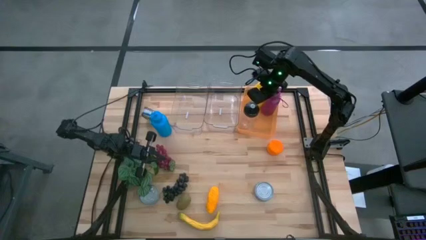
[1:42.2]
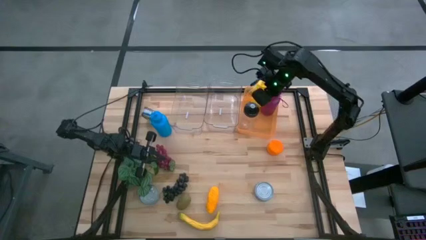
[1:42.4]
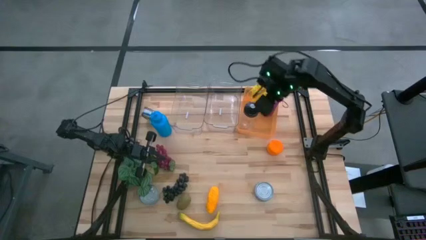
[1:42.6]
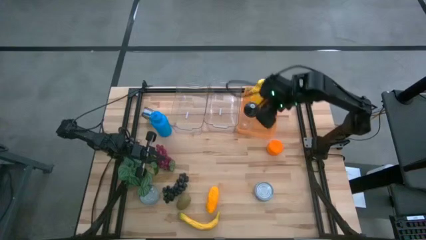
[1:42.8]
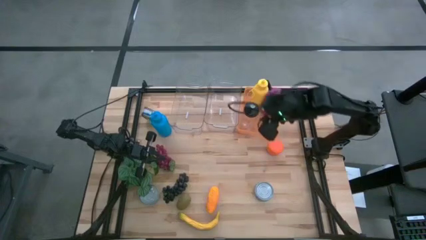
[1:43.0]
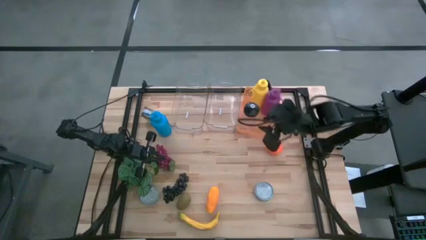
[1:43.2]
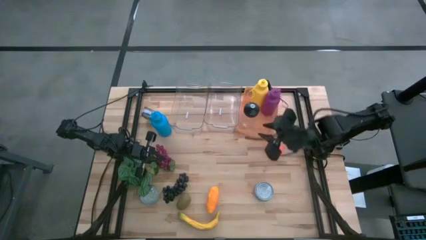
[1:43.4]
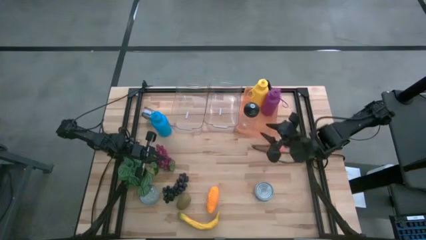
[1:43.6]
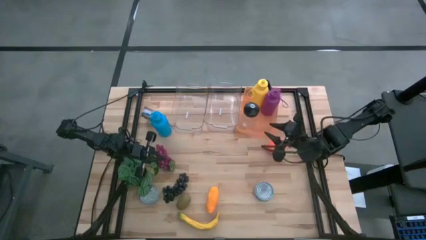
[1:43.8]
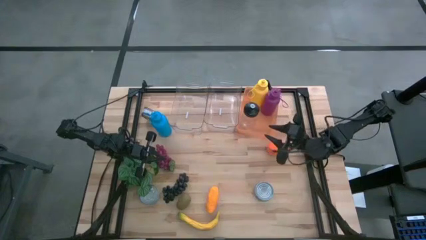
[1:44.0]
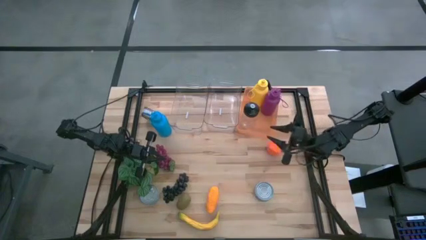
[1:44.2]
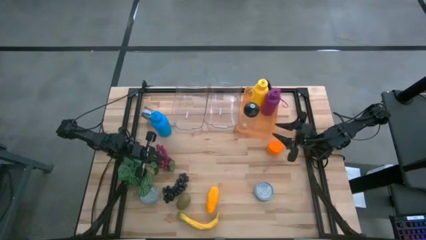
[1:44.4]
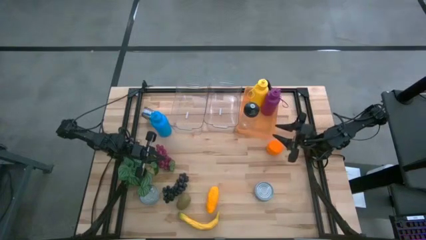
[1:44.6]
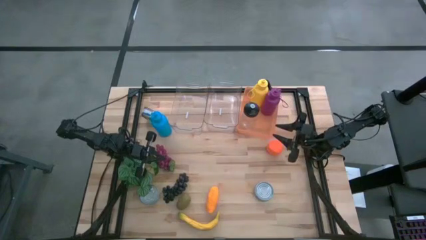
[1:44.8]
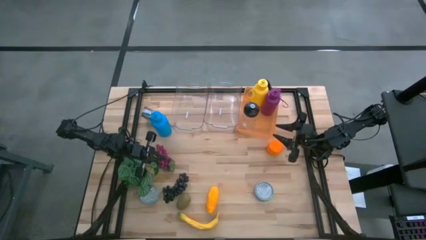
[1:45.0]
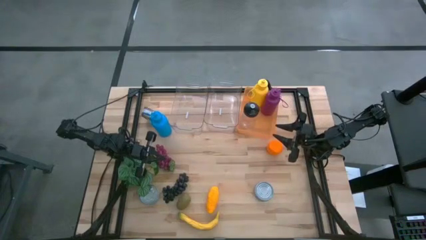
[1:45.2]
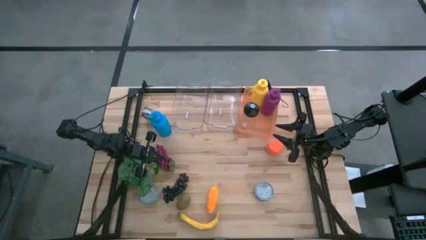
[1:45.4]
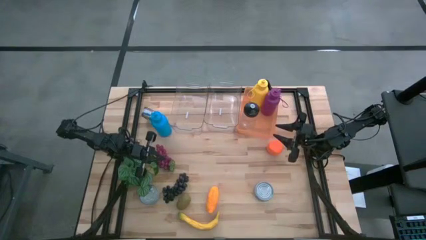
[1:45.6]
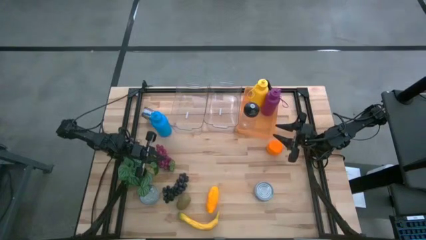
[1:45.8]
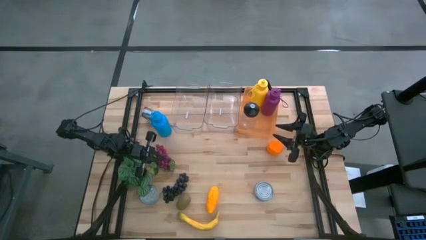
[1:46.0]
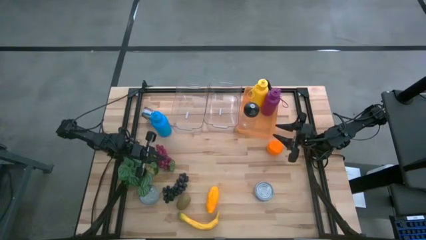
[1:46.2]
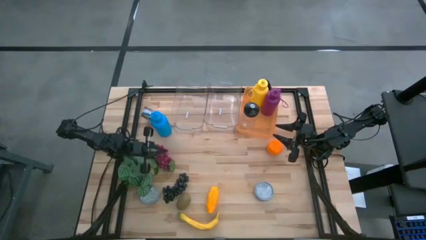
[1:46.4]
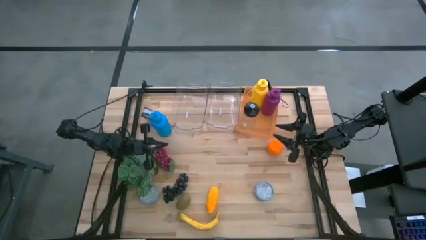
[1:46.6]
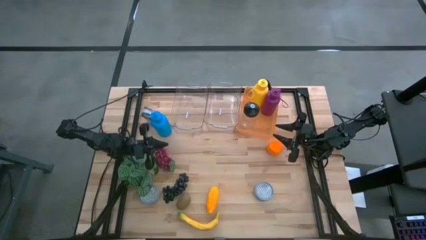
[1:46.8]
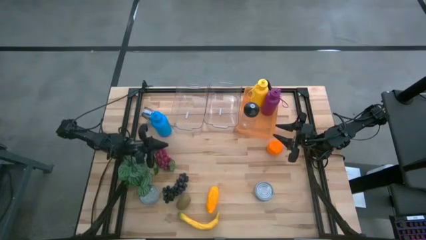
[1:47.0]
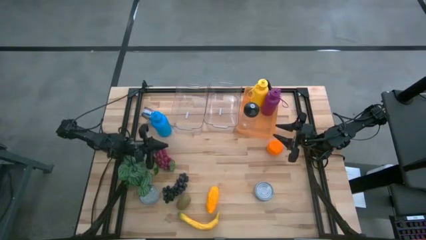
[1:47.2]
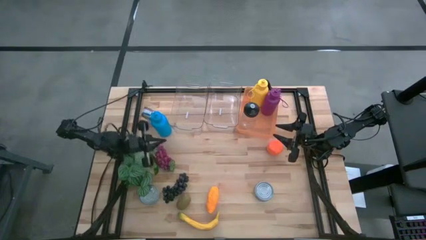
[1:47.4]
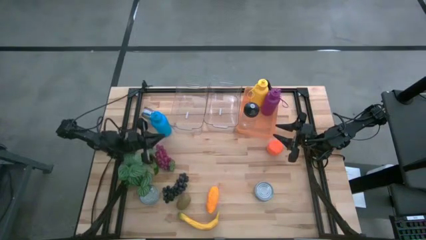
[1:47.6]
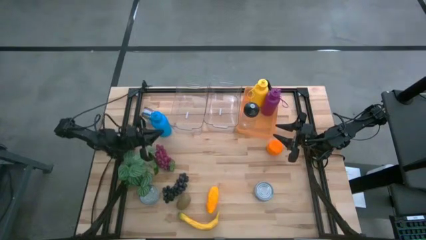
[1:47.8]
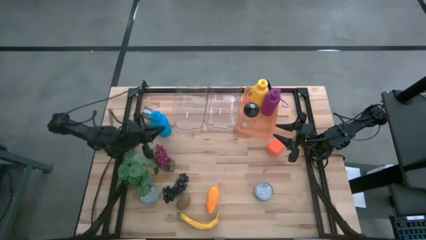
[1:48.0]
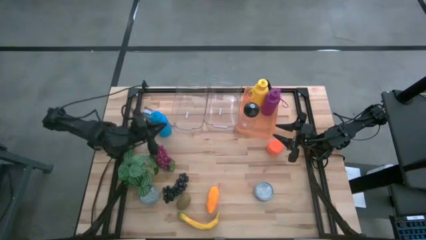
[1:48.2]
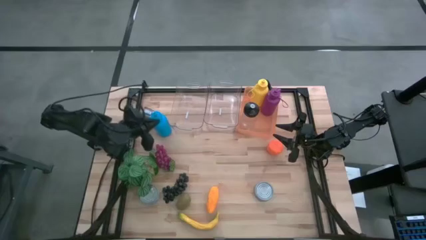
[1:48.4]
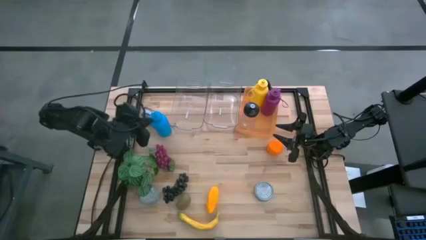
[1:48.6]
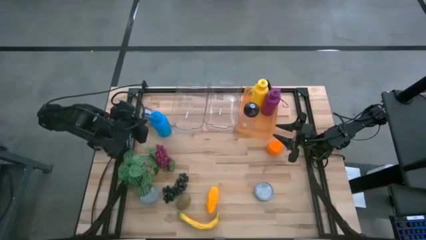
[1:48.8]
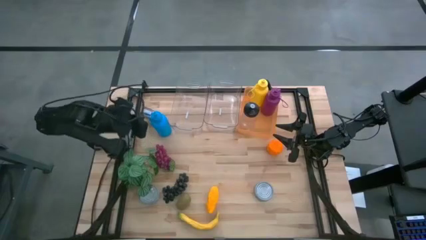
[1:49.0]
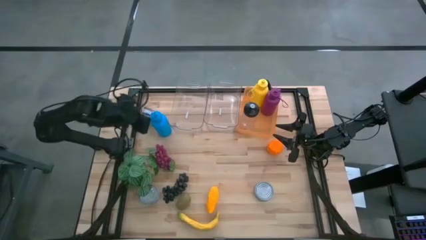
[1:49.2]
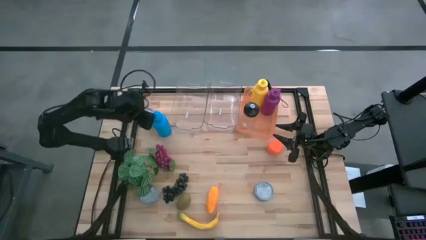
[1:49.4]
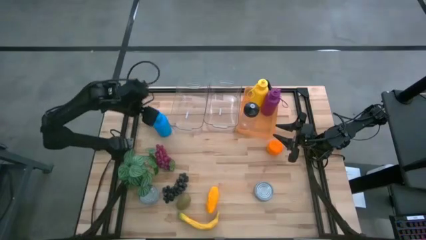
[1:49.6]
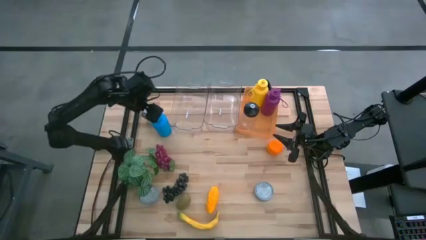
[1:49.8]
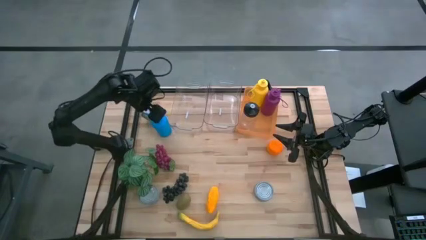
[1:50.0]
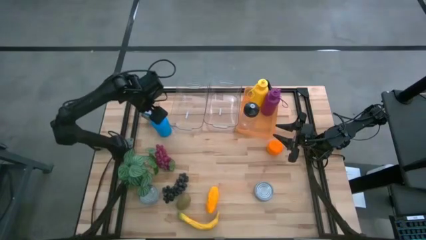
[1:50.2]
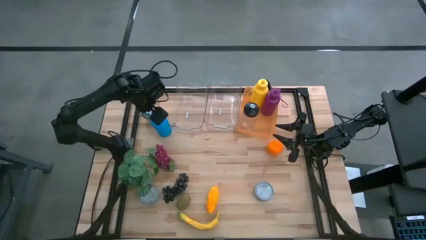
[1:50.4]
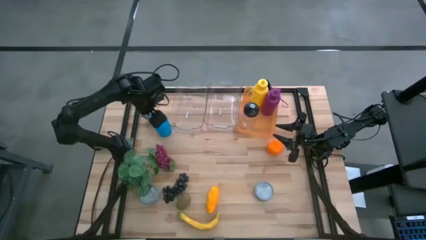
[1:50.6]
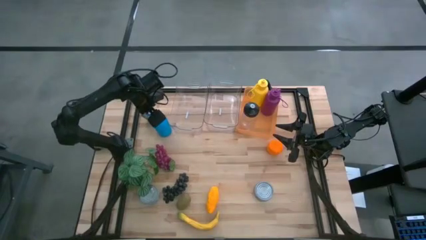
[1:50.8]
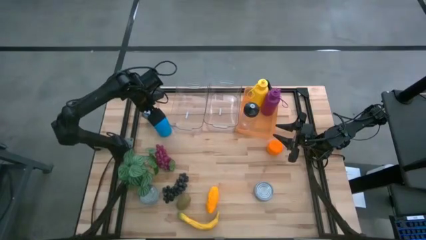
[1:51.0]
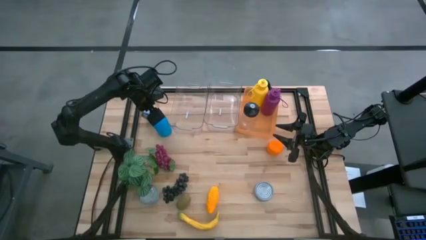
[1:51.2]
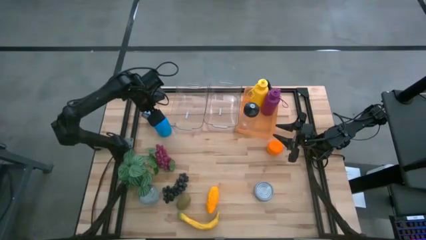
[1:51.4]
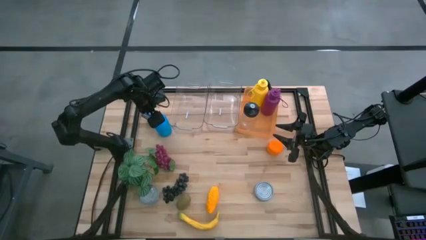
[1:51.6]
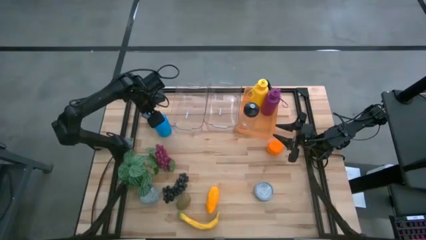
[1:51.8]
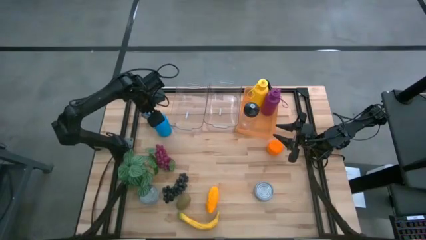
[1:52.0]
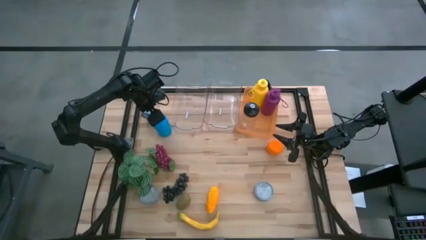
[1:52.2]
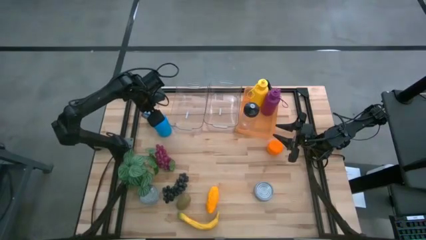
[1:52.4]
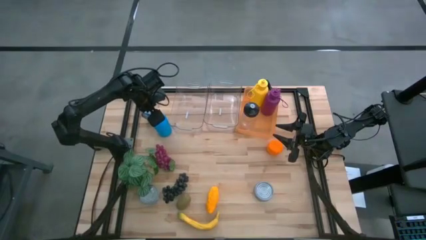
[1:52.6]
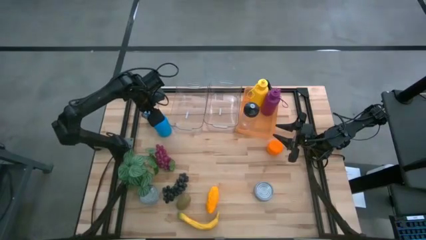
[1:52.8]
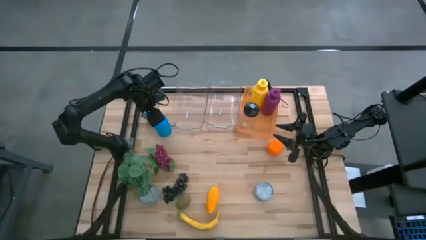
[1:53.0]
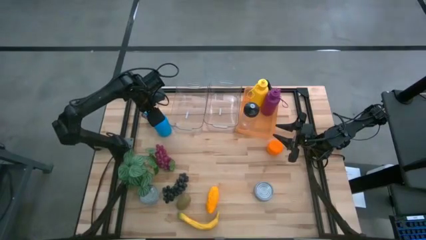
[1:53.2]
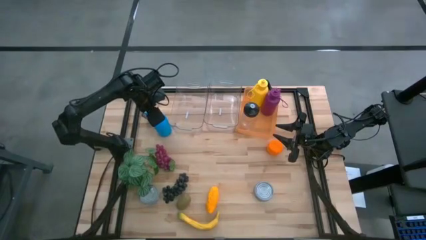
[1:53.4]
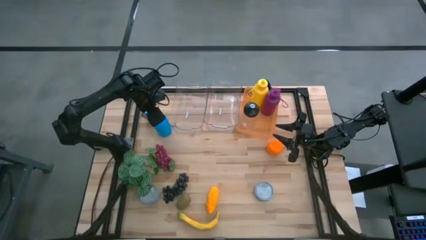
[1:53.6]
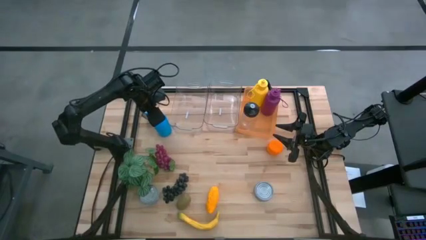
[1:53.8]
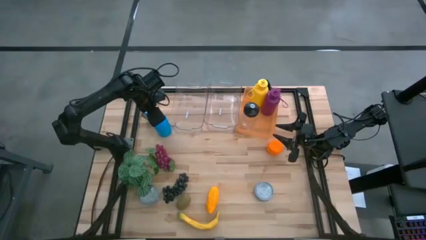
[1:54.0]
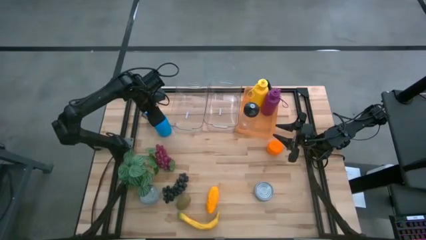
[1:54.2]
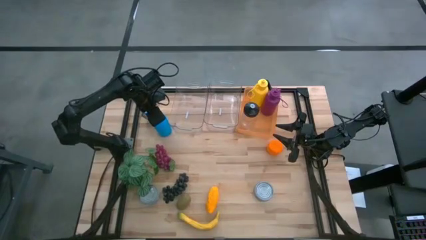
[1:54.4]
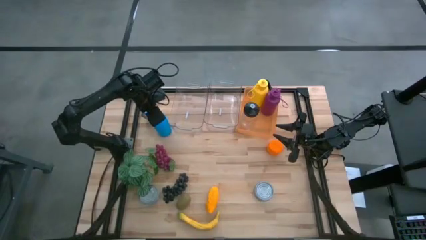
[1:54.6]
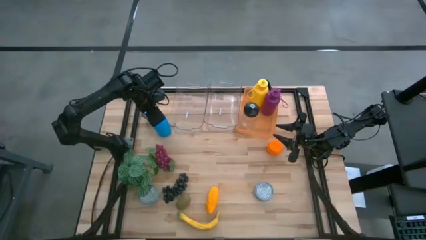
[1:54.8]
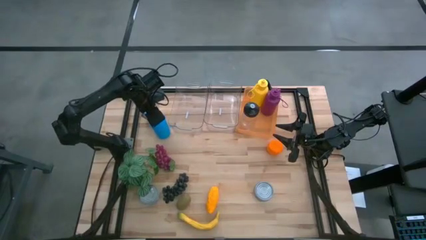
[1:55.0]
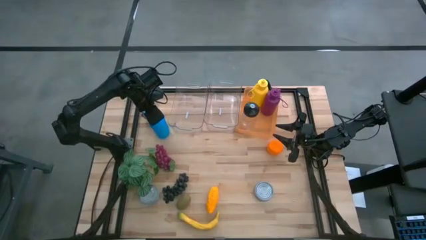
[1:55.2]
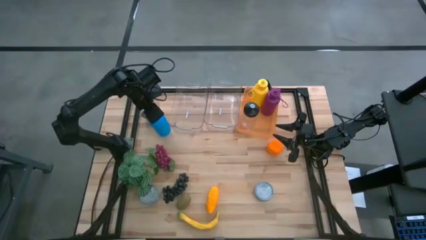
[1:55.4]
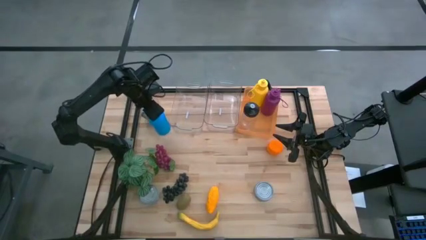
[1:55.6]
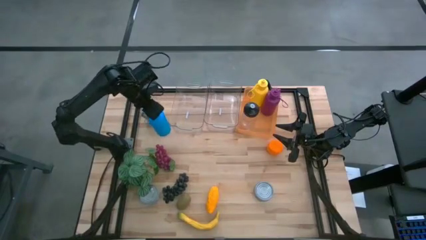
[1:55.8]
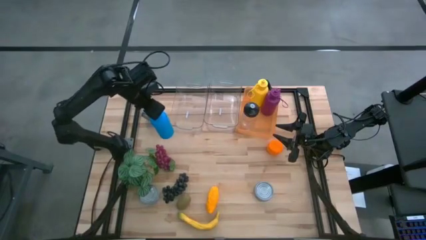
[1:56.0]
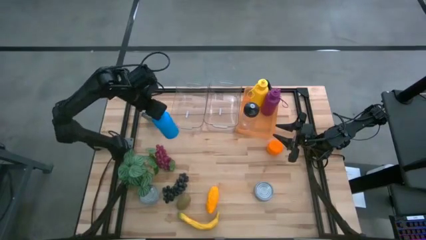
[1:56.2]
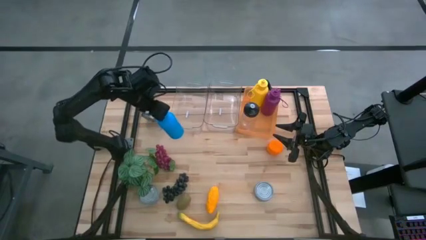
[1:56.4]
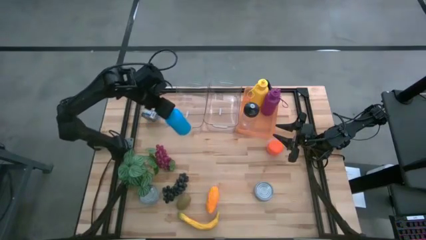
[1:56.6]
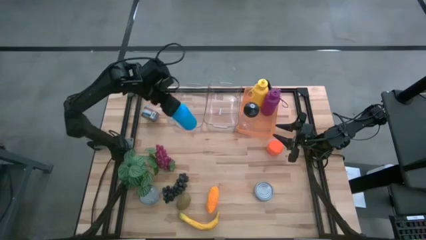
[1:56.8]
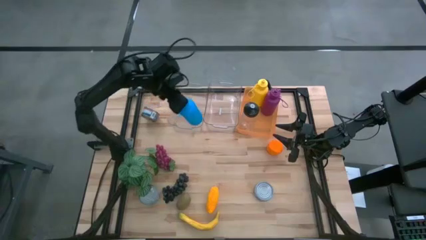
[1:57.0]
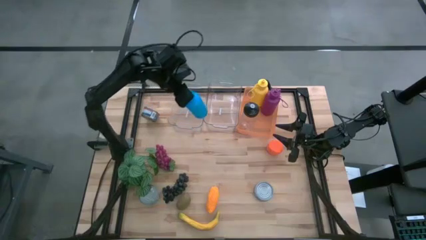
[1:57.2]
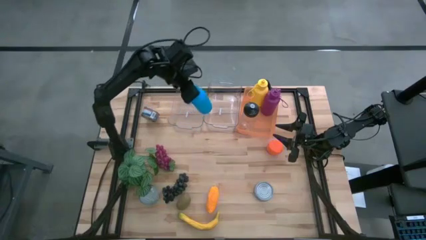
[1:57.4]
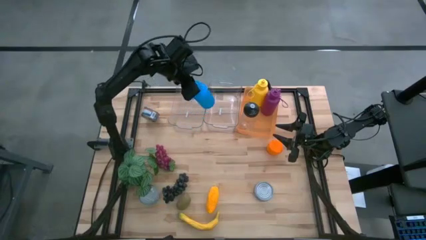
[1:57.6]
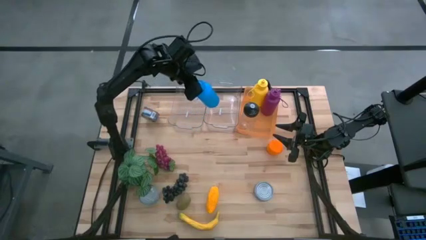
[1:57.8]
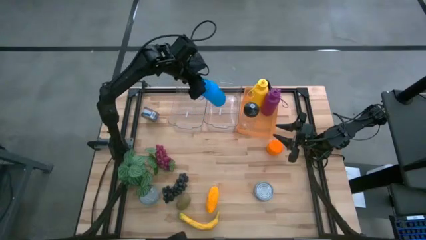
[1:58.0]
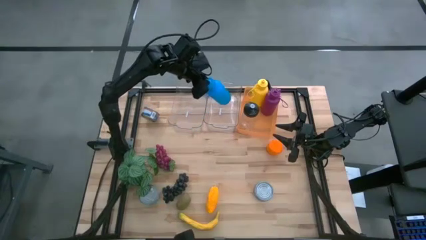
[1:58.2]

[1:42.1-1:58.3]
Task: Pick & Place Food Item
Put the blue water bottle into the orange bin
